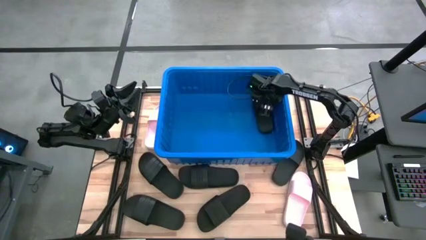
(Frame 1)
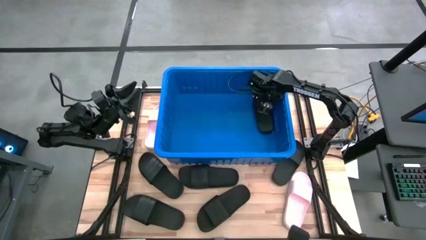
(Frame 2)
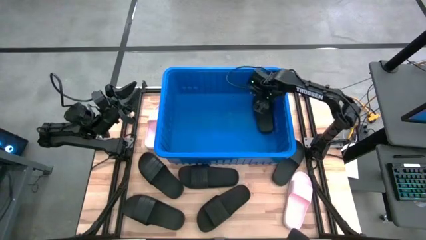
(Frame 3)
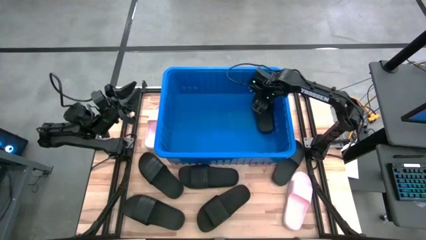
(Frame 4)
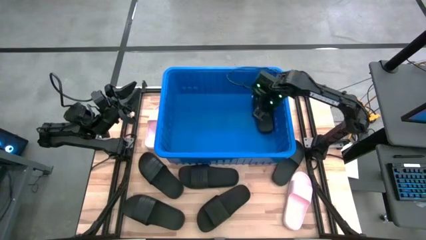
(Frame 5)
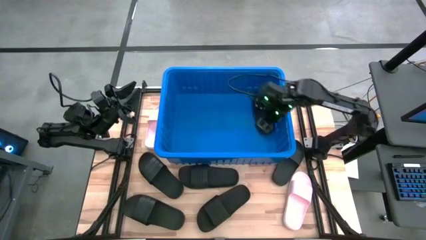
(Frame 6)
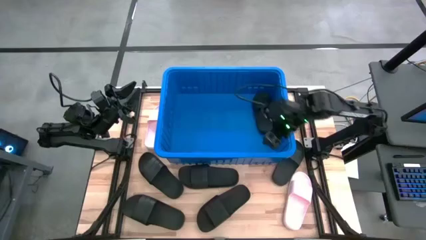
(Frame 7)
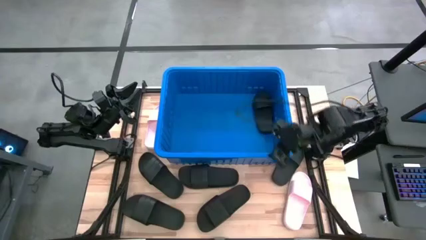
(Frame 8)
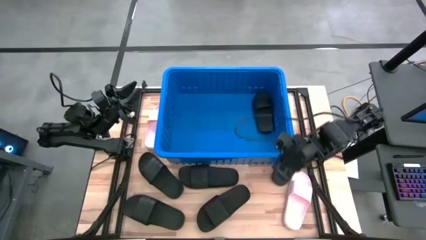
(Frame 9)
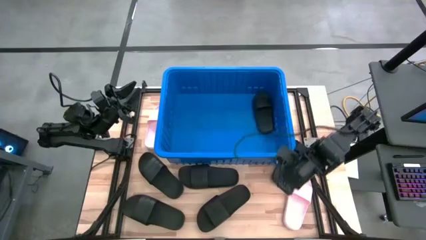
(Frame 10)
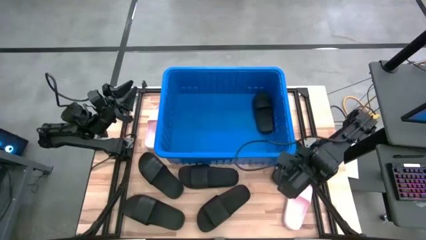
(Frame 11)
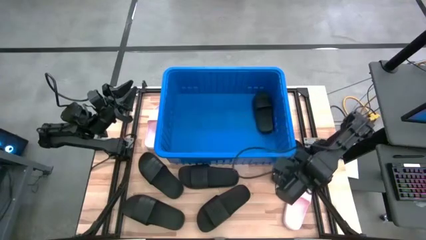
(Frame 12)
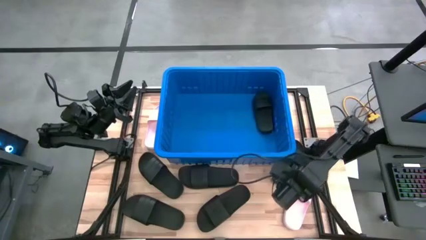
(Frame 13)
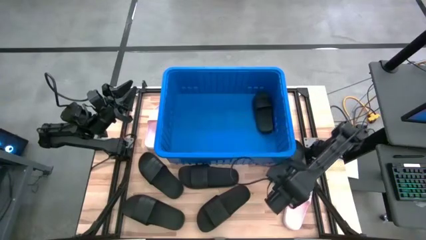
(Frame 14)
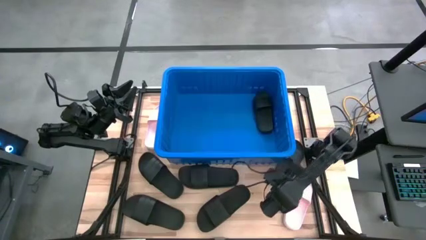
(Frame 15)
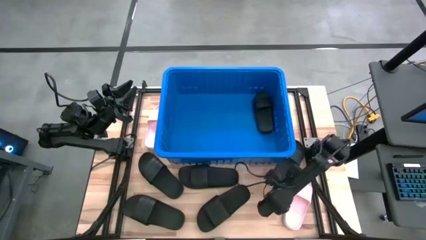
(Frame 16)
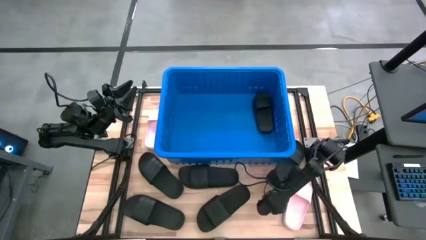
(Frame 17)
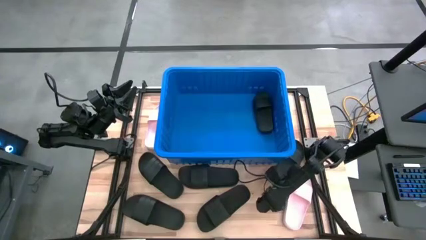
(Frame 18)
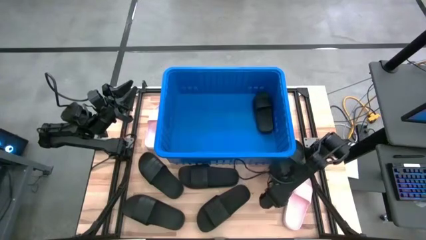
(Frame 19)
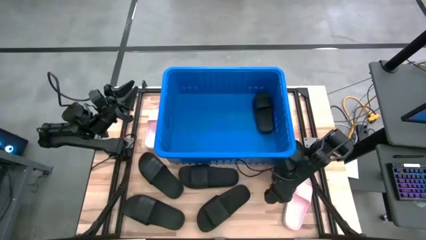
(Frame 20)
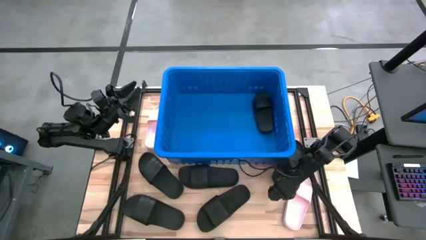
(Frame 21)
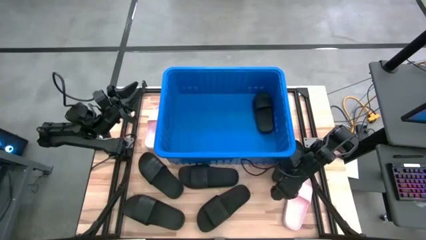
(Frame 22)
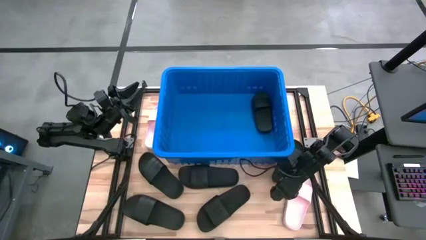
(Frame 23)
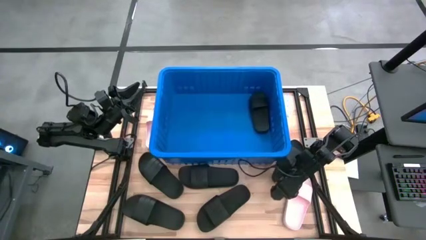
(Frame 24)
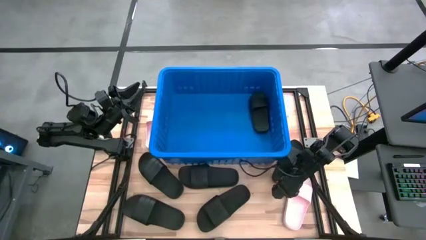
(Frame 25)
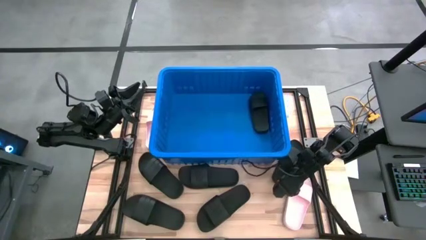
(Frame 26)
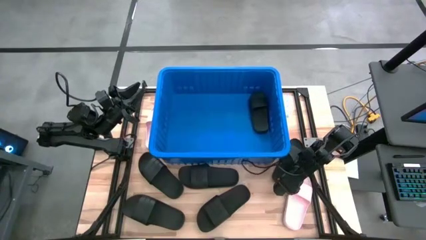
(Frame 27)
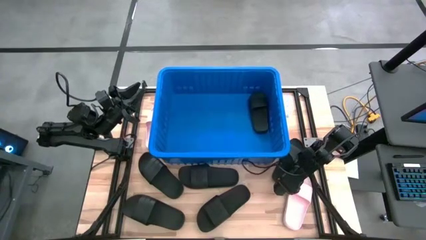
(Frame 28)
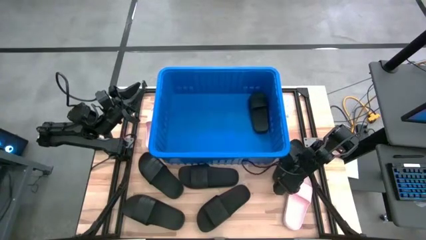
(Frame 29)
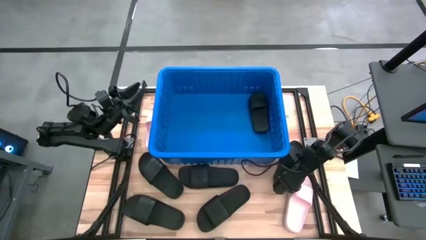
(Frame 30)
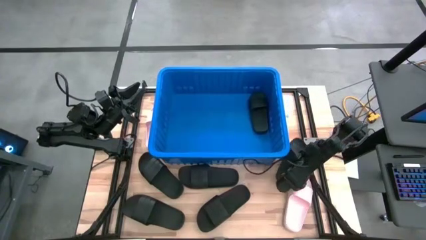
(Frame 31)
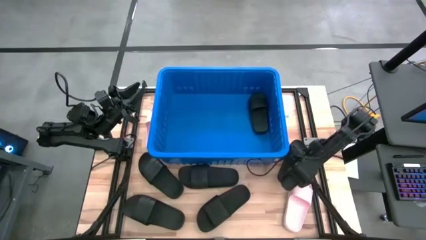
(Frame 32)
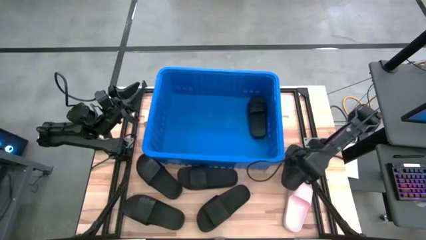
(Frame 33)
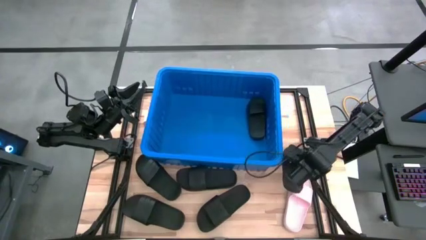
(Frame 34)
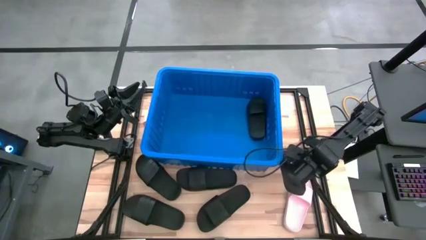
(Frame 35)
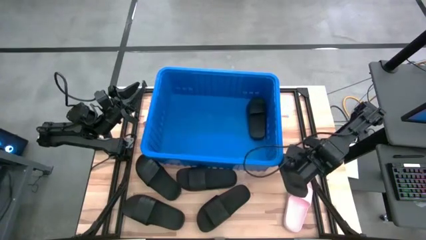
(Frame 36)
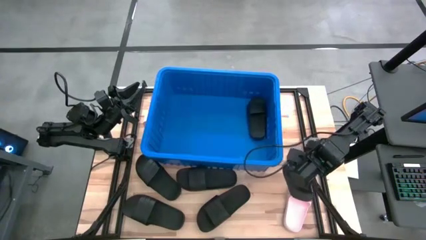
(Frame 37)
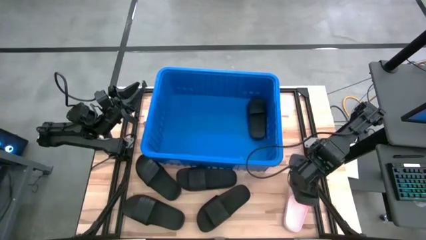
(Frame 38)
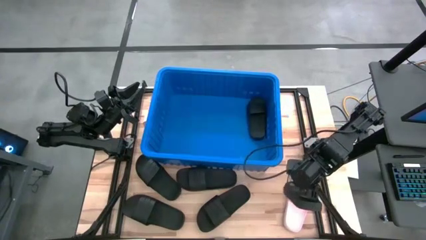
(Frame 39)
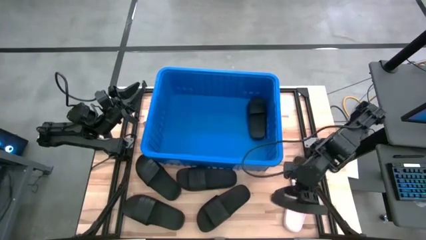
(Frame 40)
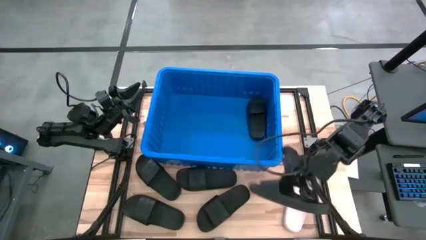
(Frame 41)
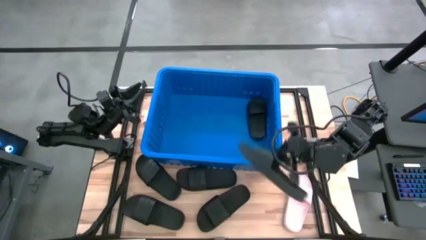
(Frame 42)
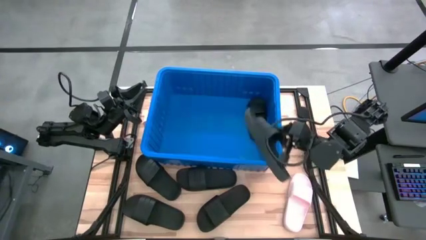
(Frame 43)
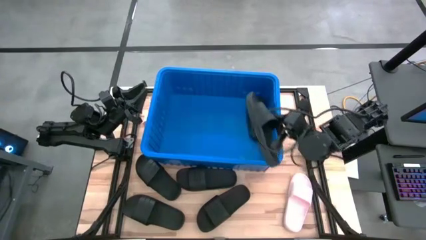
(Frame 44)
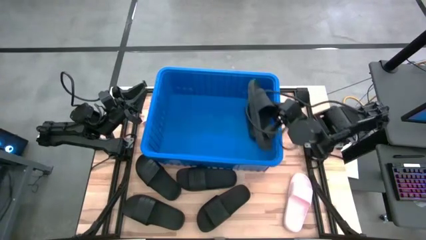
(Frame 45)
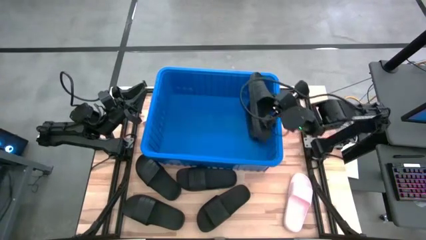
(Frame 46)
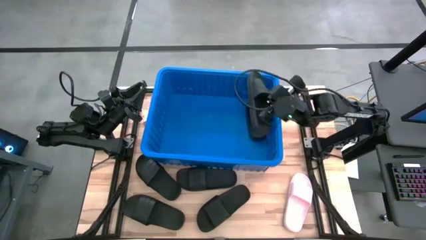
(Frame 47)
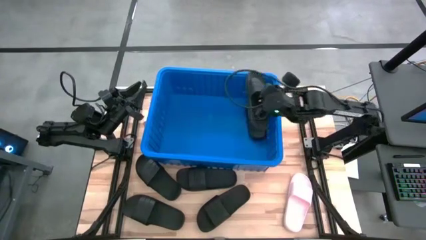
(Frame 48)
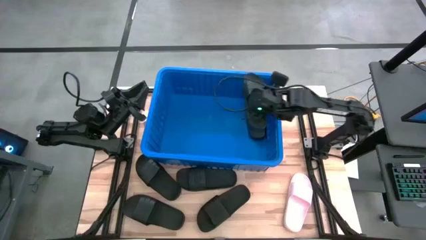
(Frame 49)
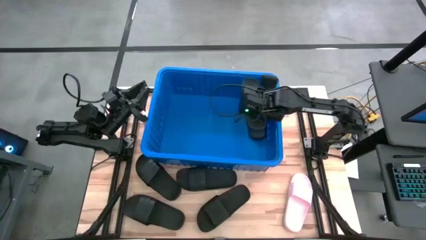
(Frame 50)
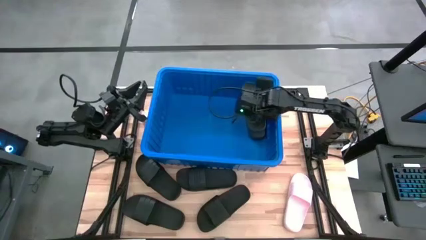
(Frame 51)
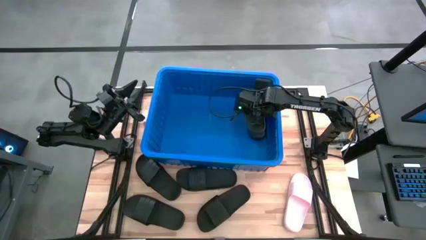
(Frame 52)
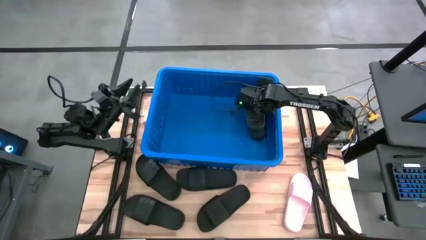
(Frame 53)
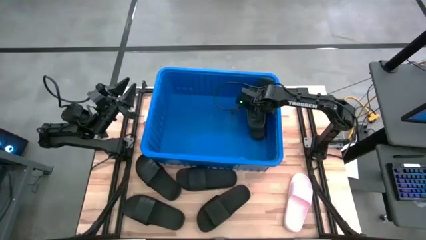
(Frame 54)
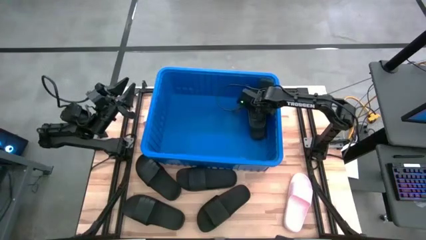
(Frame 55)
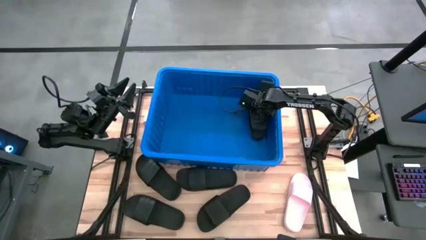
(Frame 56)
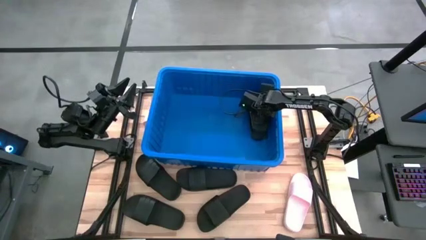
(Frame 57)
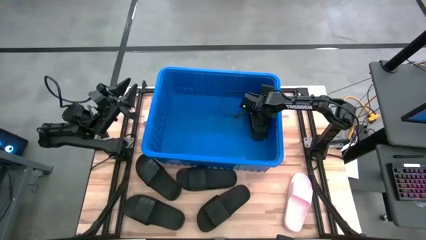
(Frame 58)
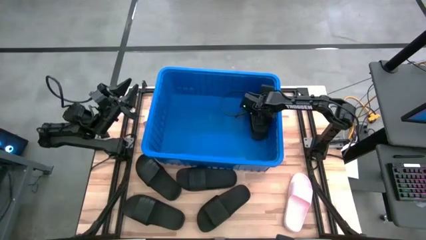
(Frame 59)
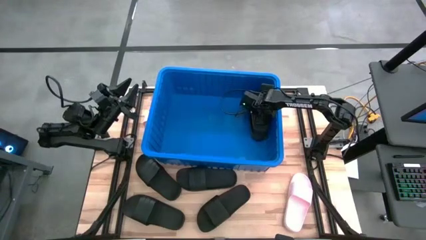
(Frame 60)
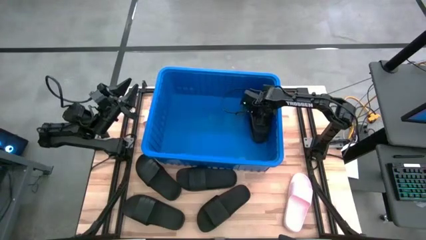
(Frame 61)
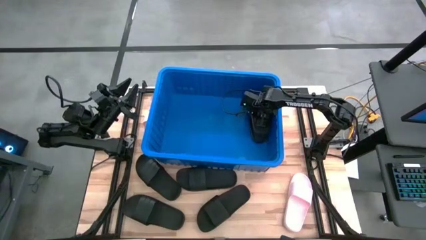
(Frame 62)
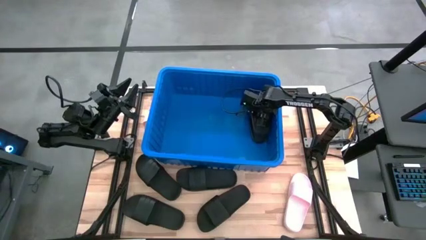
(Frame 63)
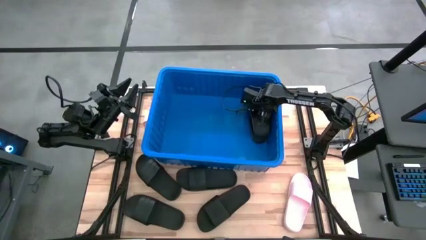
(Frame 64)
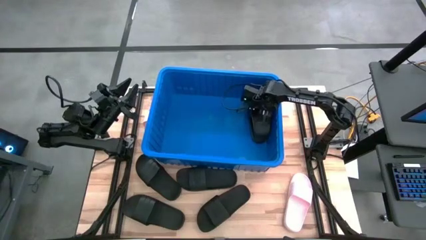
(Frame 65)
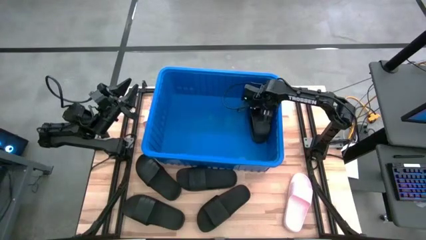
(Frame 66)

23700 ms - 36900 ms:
Task: Pick and place slides into bin
Put the black slide into the blue bin
